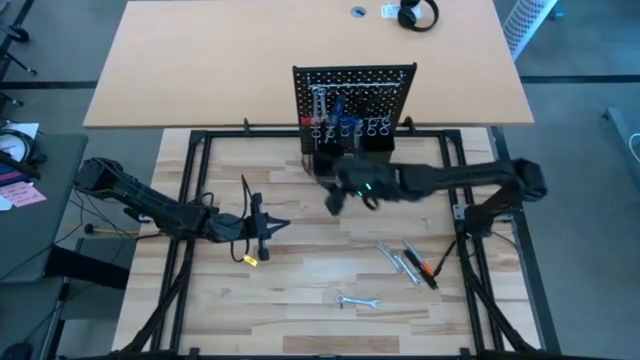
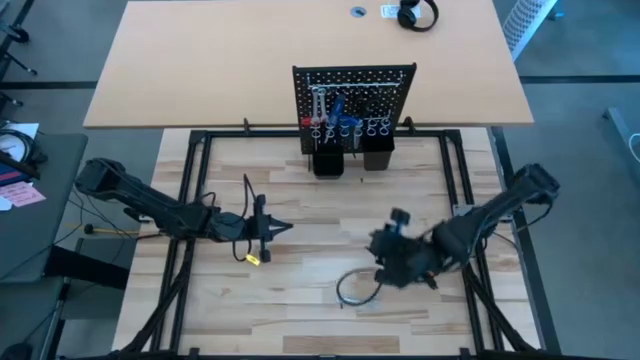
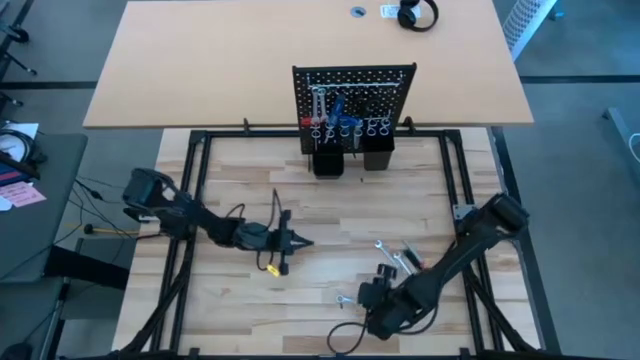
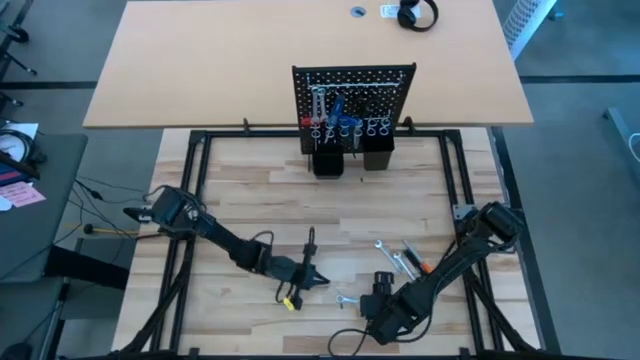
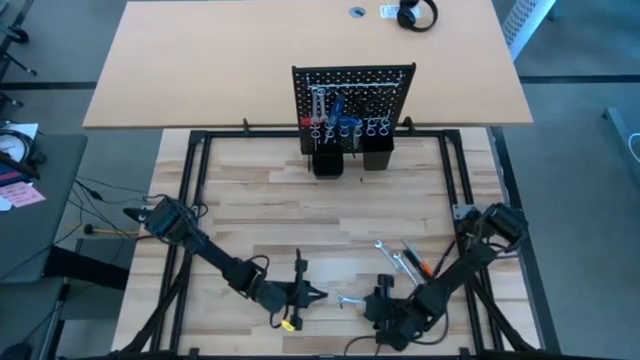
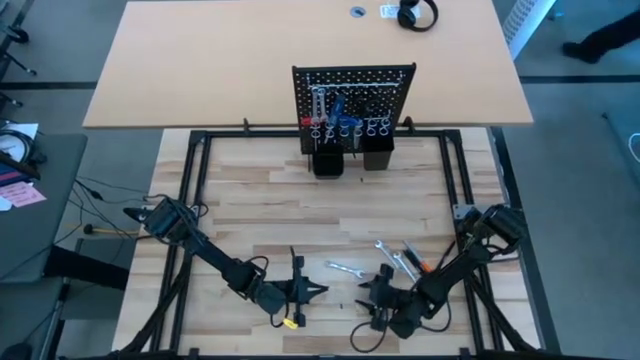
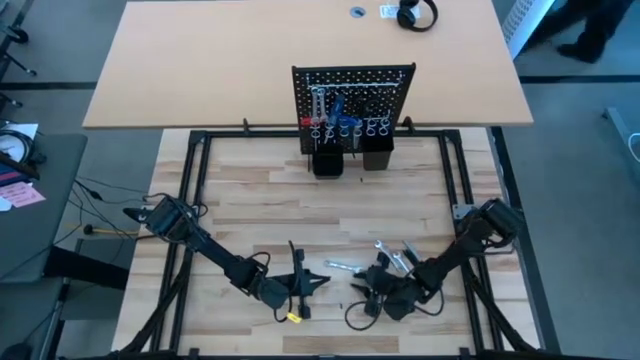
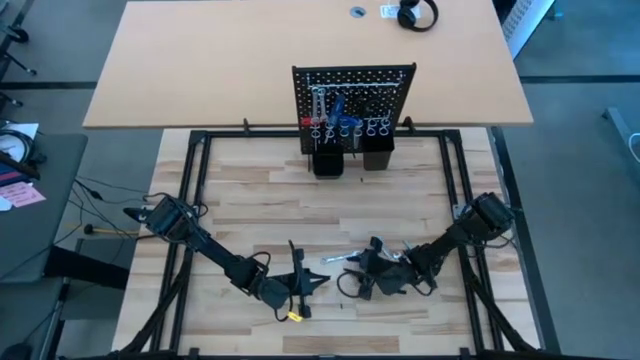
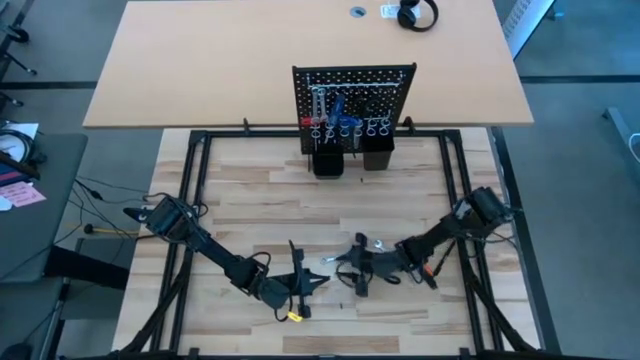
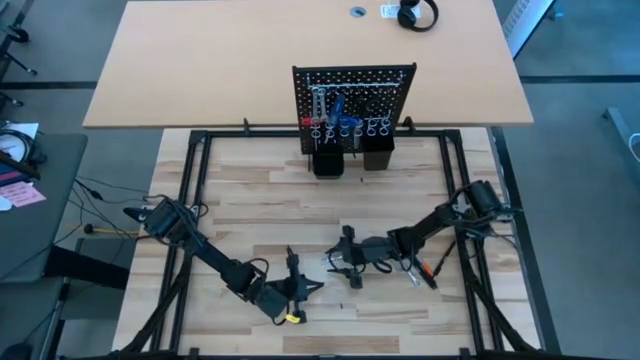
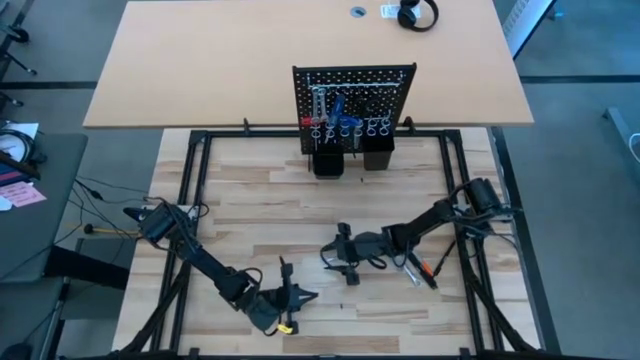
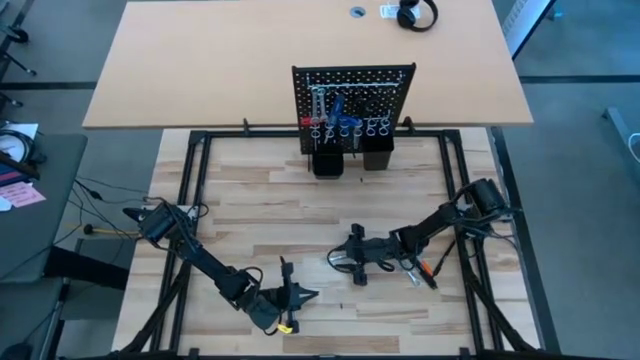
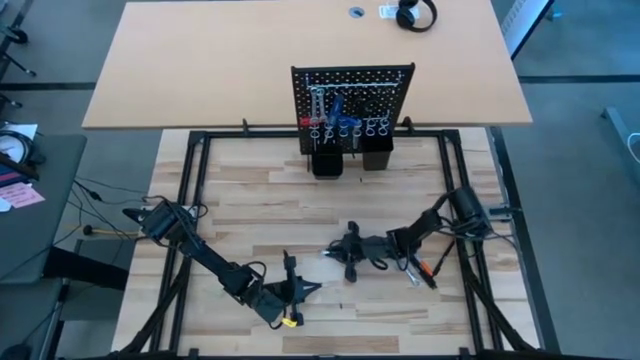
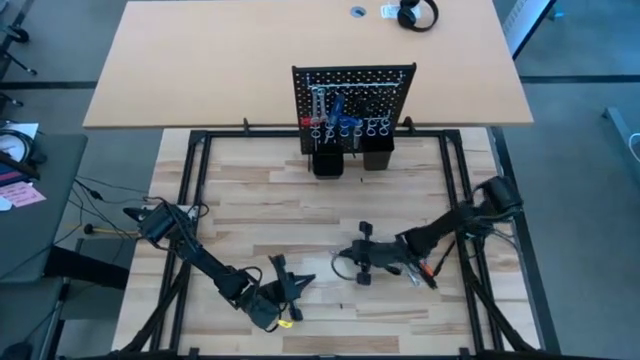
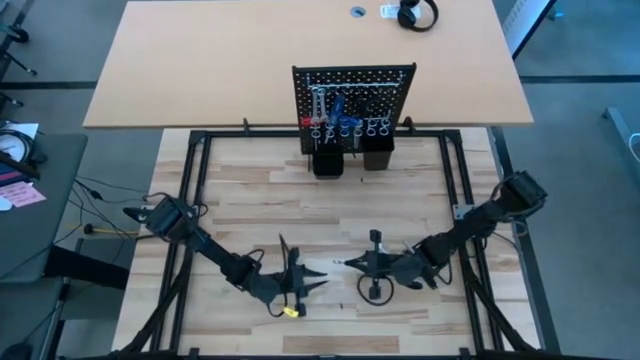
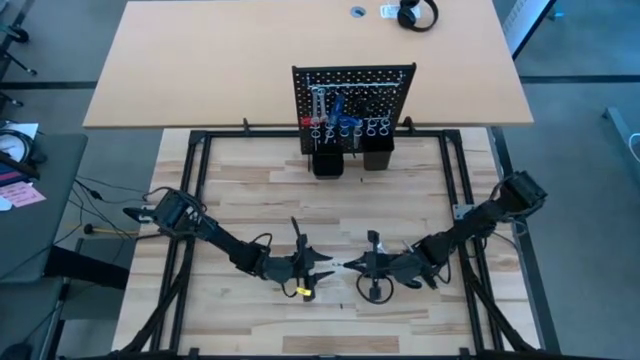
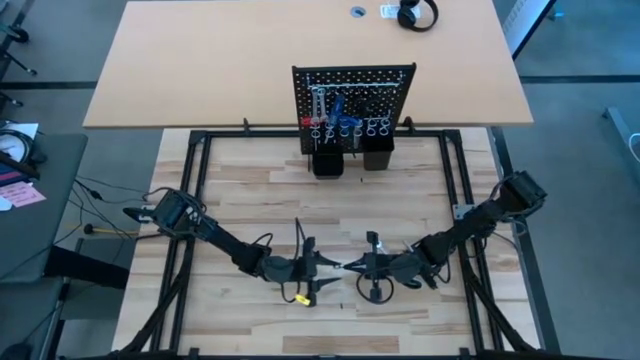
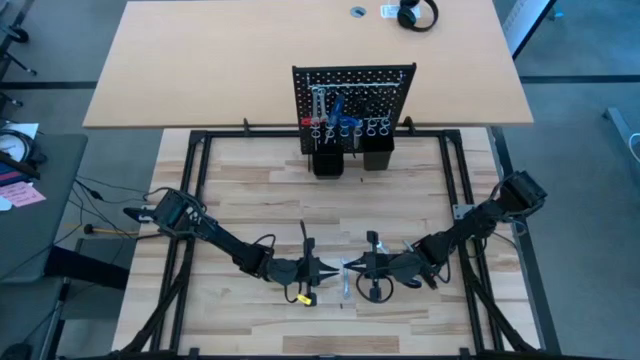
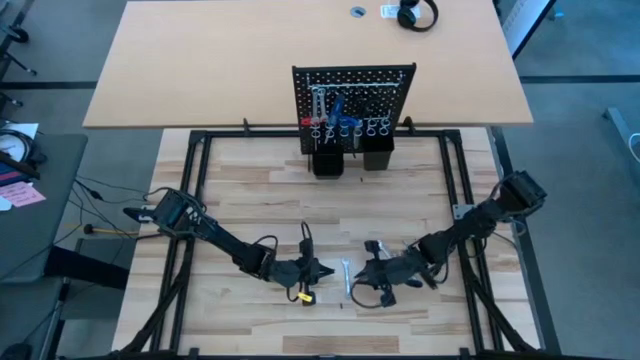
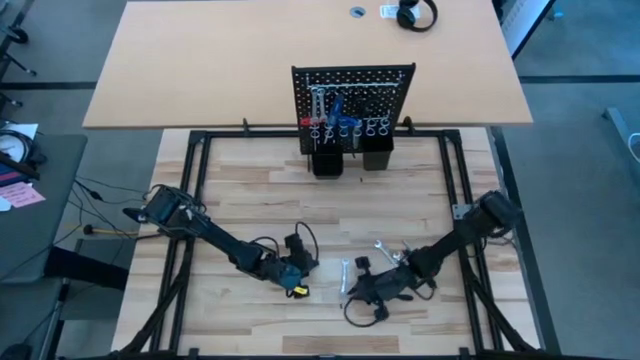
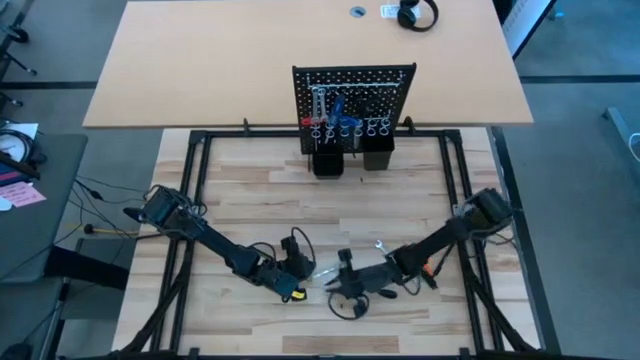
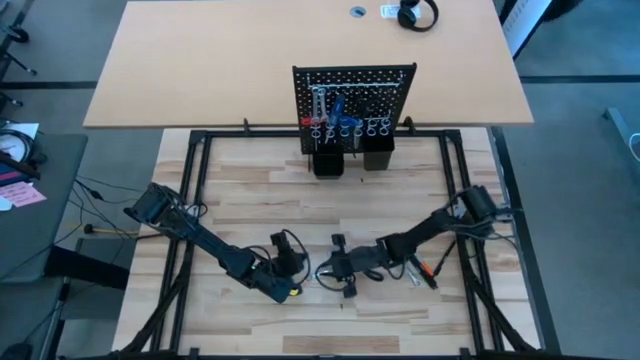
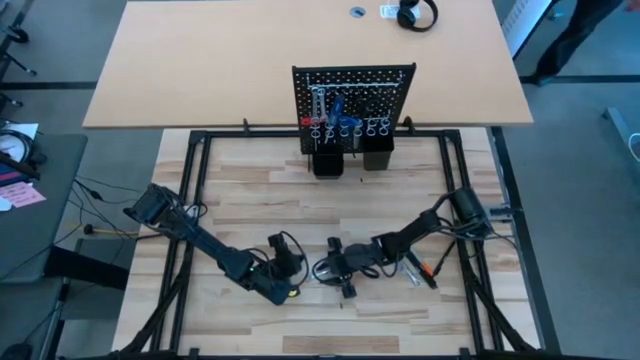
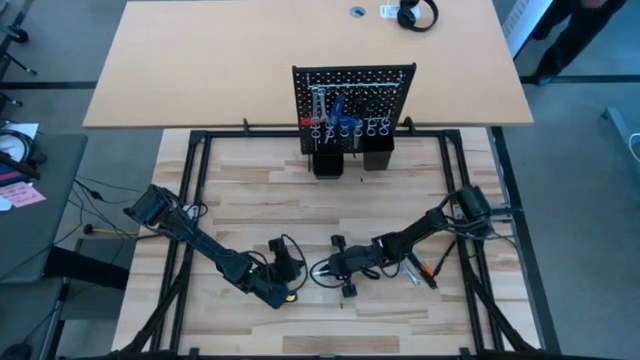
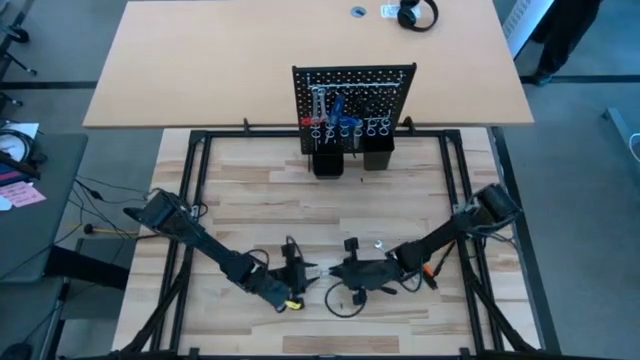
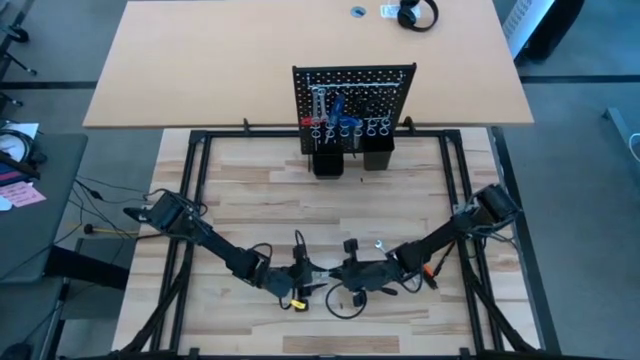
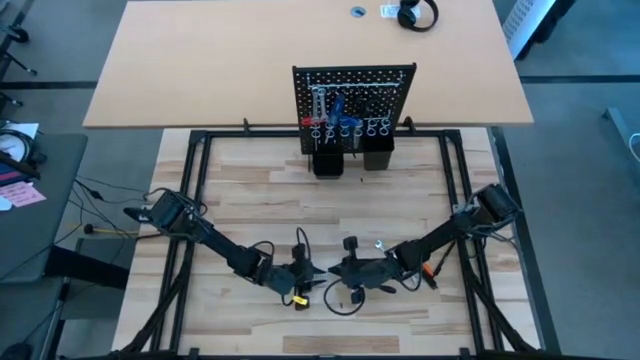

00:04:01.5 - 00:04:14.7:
Task: Hang tools onto peg board
Hang the wrench on the pegboard

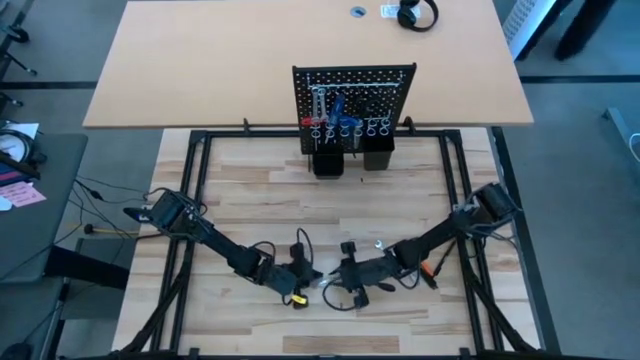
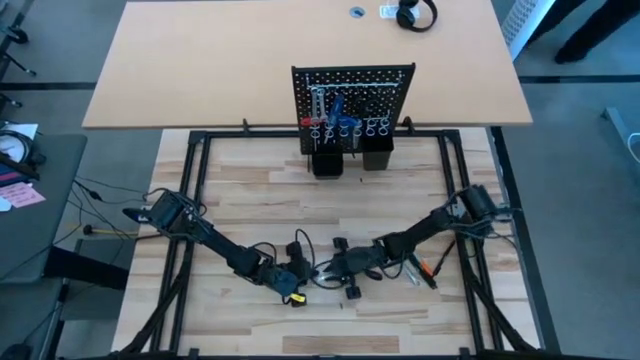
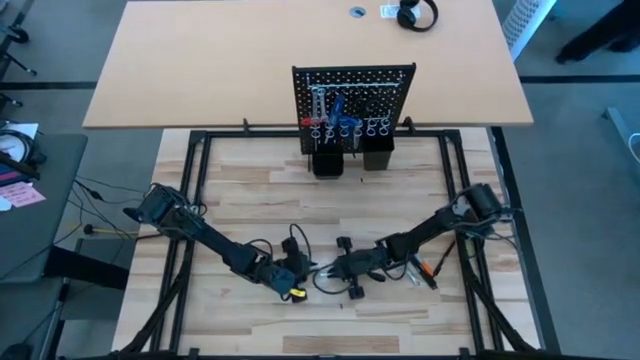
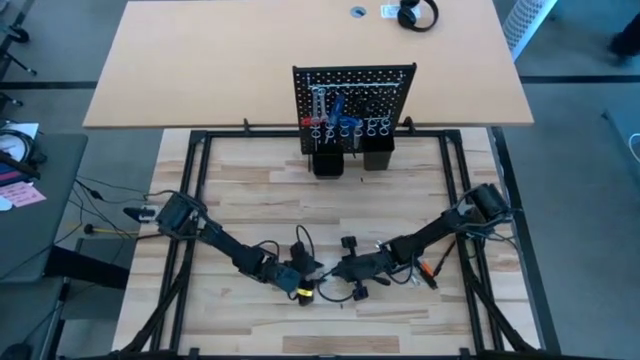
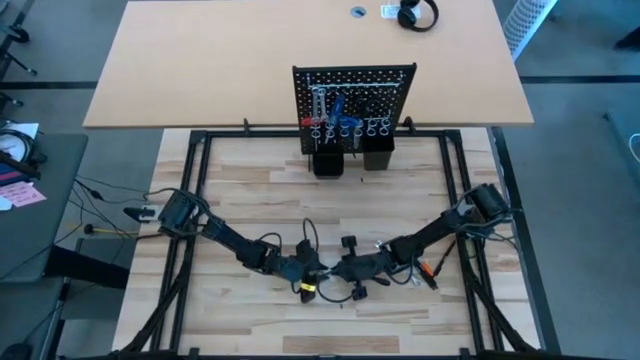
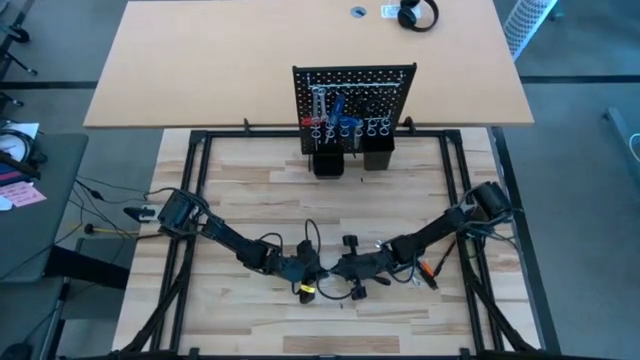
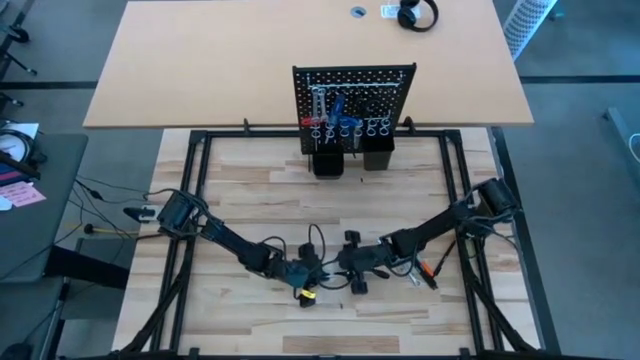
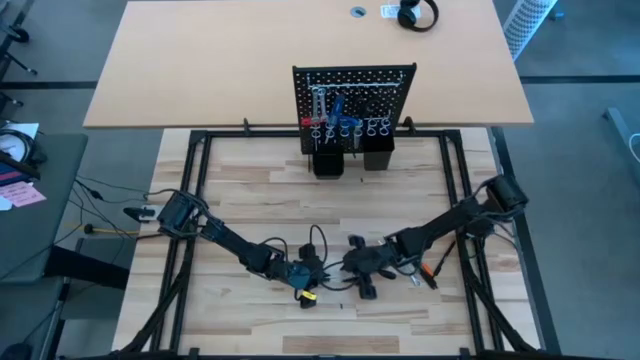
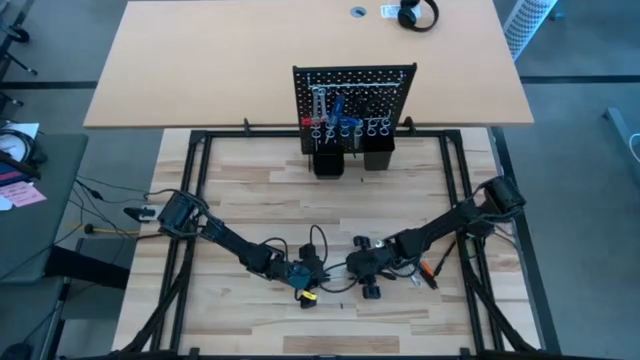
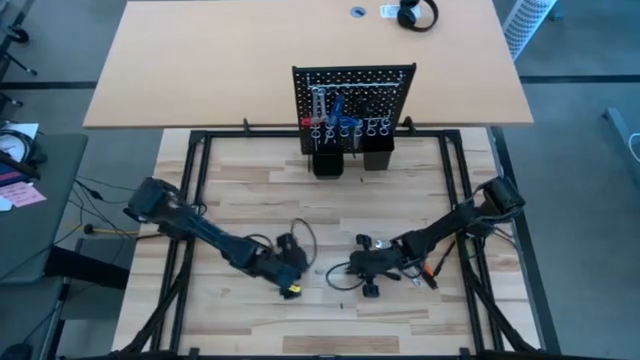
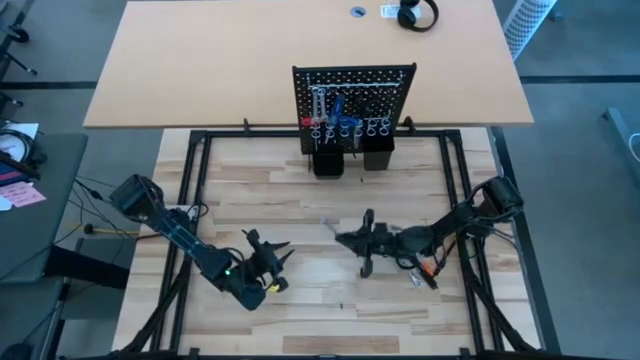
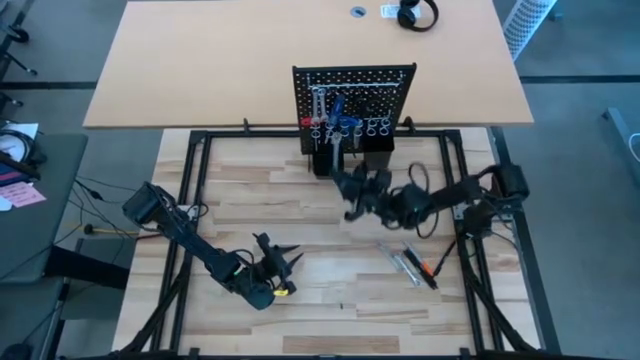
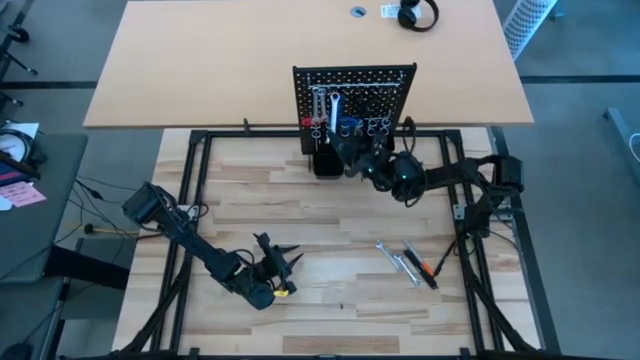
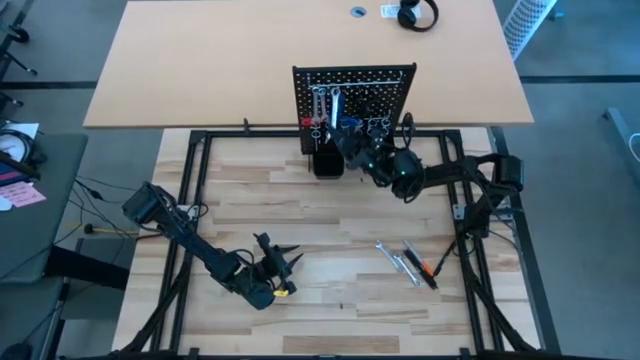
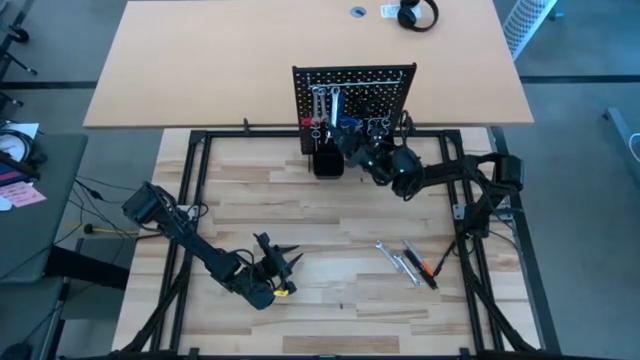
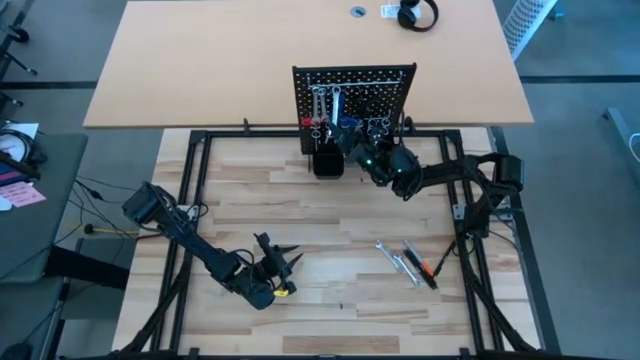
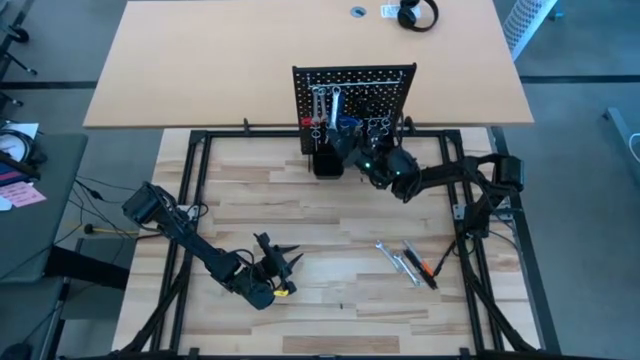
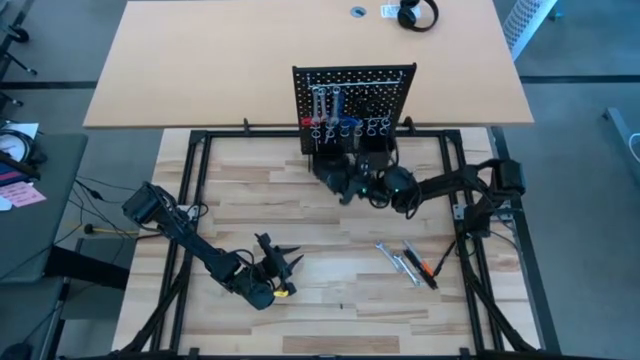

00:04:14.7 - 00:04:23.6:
Hang the wrench on the pegboard
